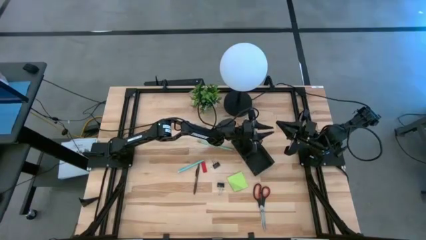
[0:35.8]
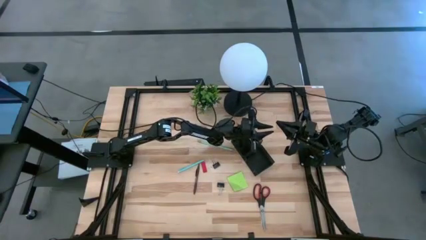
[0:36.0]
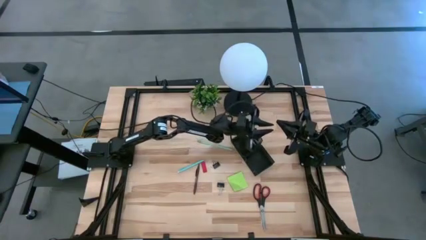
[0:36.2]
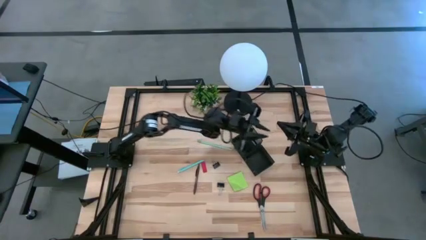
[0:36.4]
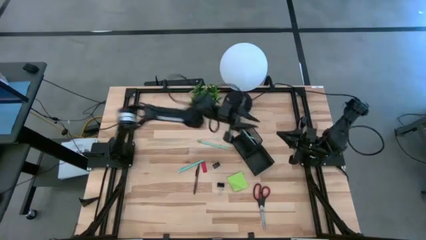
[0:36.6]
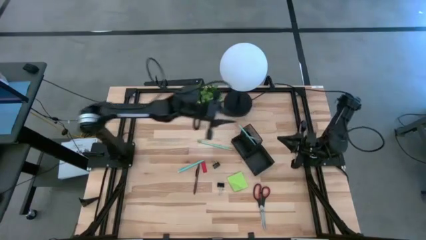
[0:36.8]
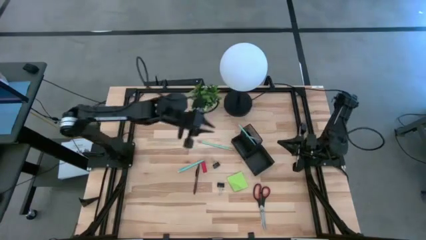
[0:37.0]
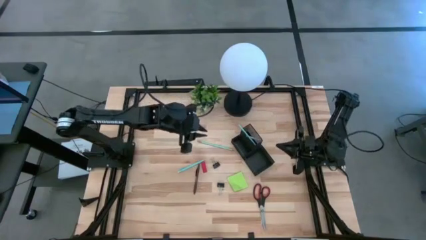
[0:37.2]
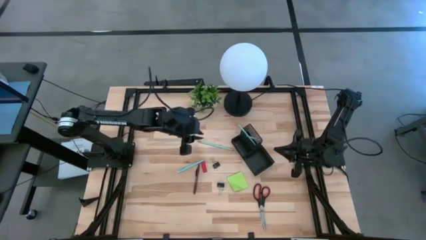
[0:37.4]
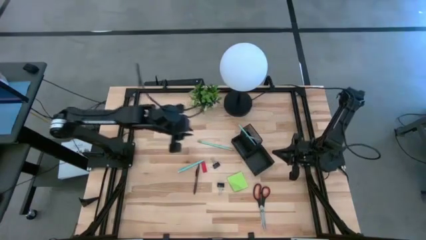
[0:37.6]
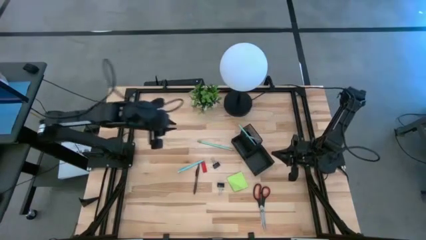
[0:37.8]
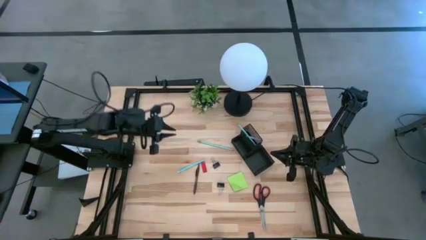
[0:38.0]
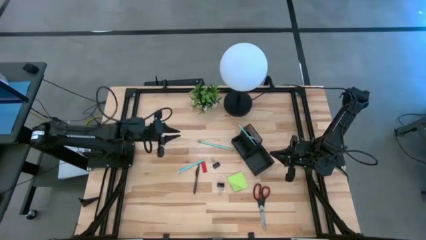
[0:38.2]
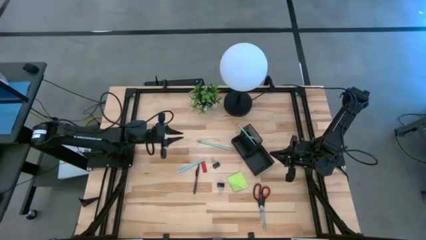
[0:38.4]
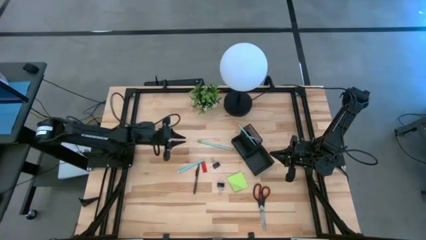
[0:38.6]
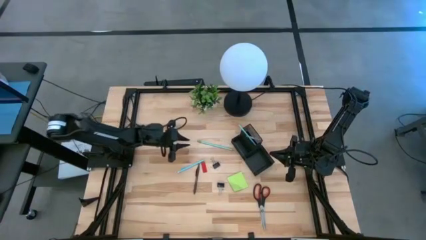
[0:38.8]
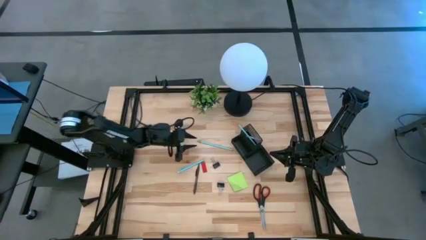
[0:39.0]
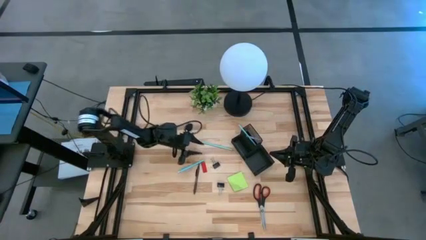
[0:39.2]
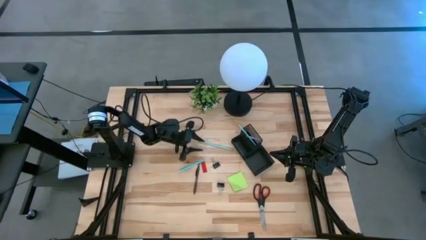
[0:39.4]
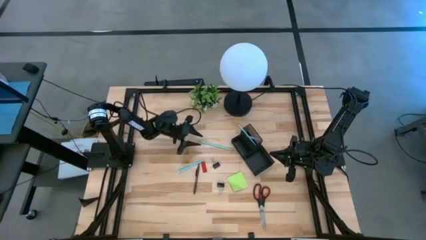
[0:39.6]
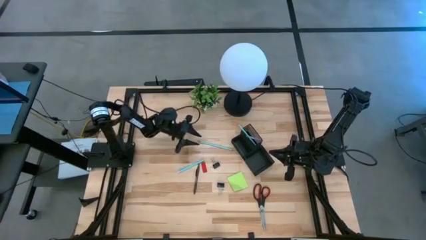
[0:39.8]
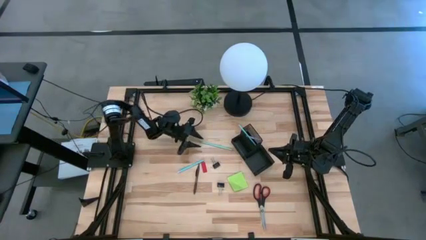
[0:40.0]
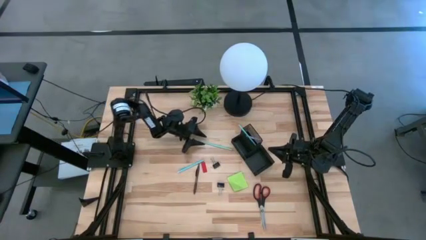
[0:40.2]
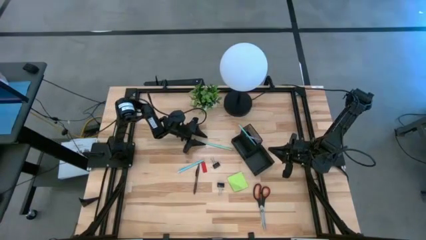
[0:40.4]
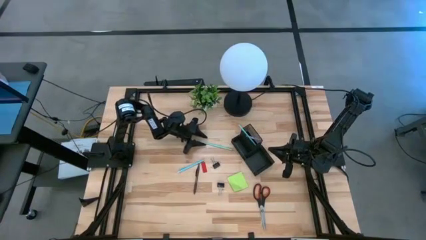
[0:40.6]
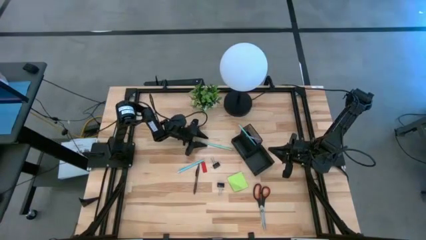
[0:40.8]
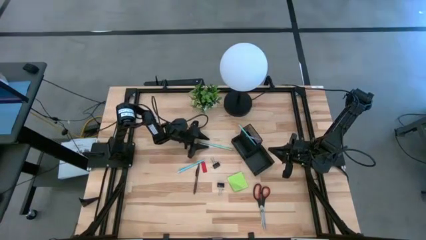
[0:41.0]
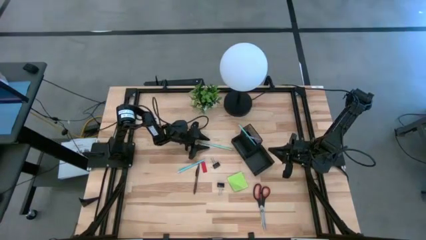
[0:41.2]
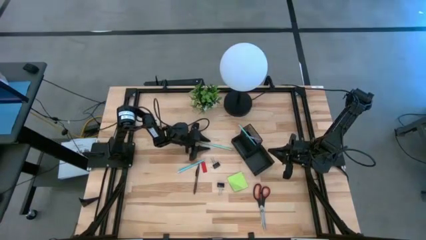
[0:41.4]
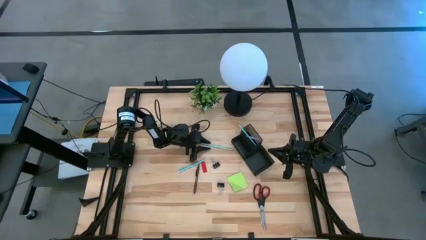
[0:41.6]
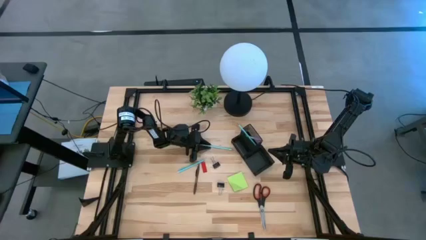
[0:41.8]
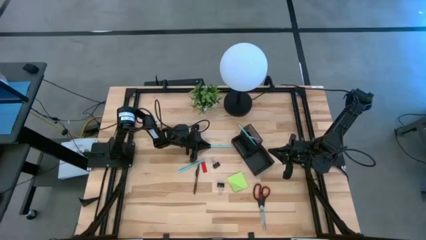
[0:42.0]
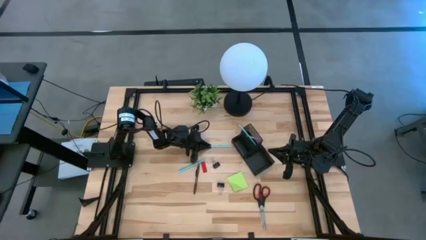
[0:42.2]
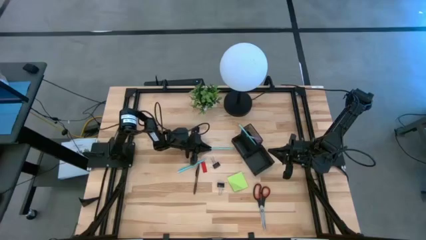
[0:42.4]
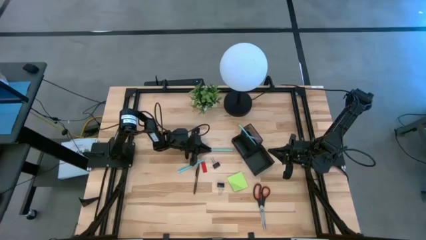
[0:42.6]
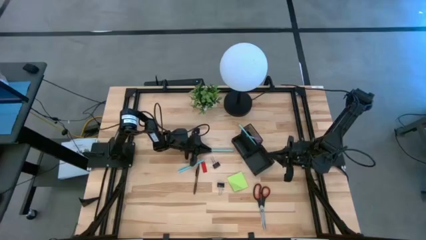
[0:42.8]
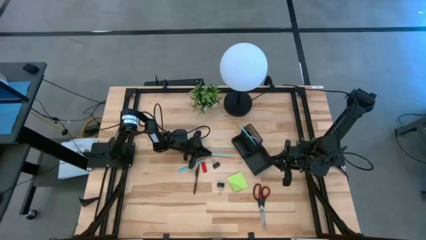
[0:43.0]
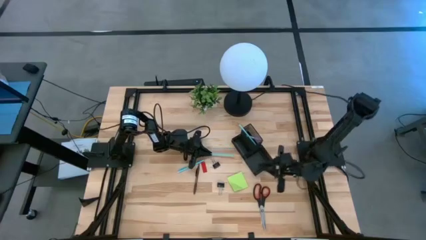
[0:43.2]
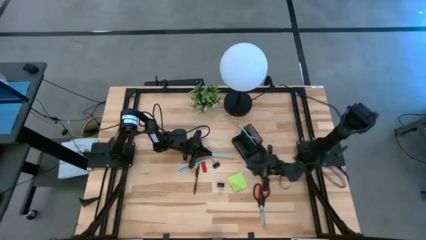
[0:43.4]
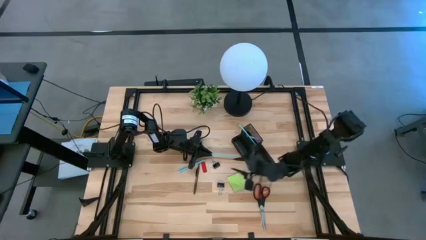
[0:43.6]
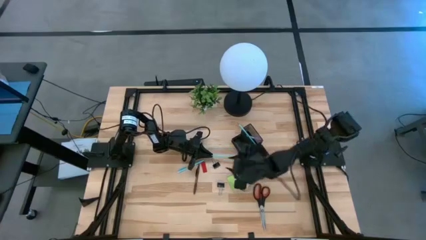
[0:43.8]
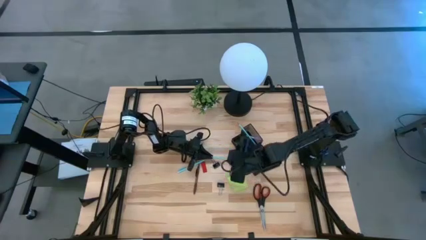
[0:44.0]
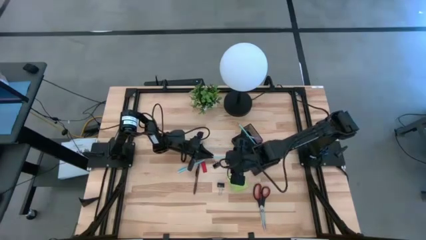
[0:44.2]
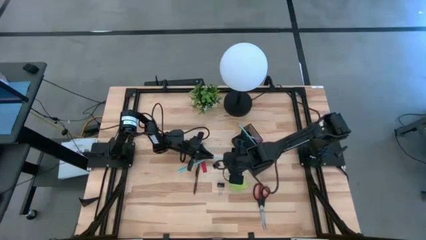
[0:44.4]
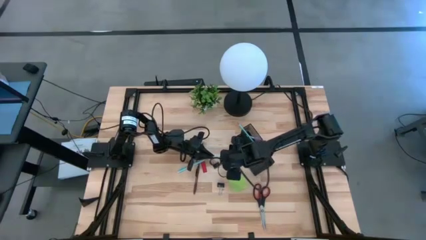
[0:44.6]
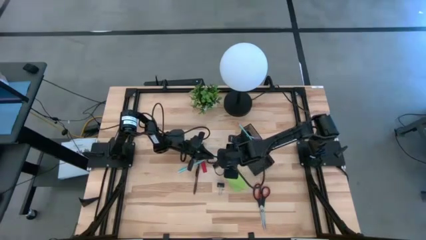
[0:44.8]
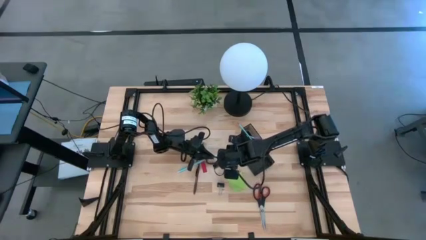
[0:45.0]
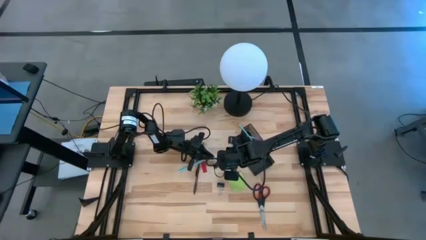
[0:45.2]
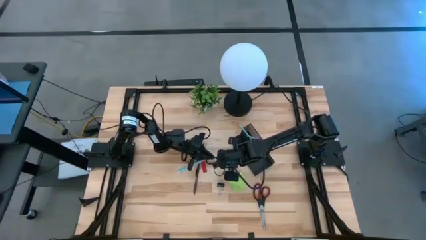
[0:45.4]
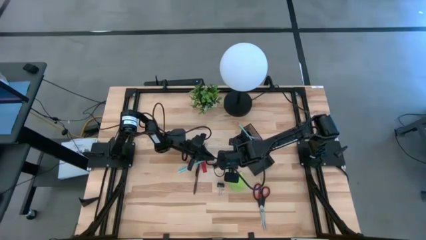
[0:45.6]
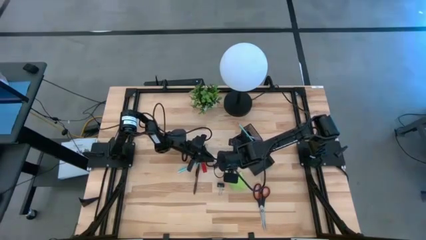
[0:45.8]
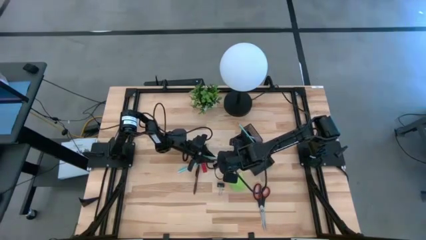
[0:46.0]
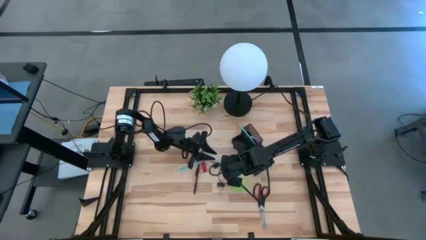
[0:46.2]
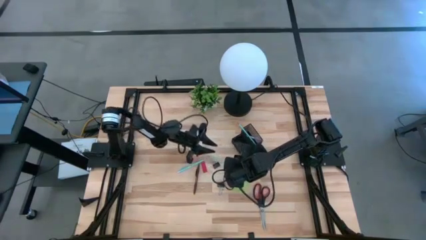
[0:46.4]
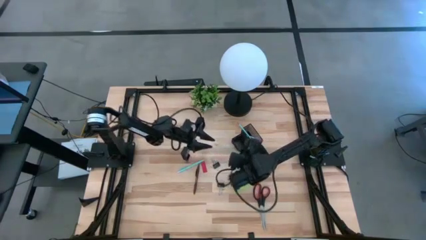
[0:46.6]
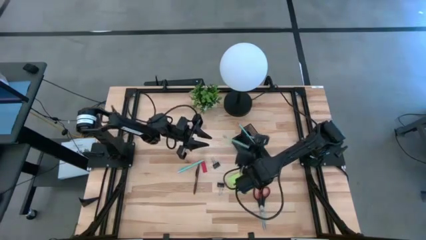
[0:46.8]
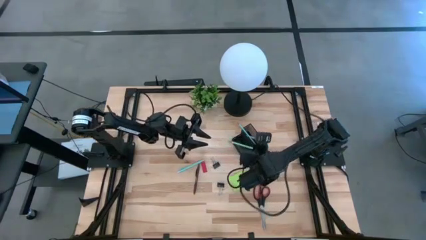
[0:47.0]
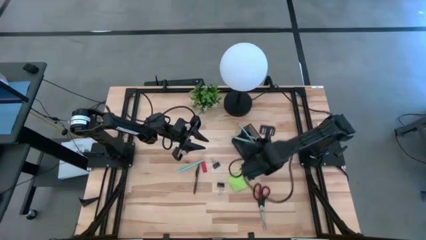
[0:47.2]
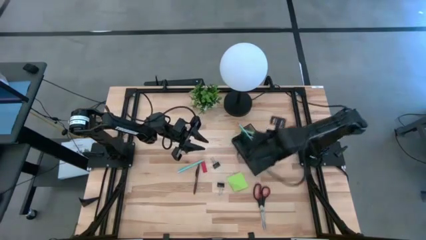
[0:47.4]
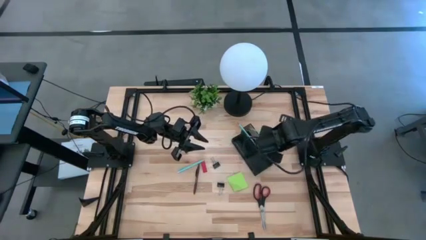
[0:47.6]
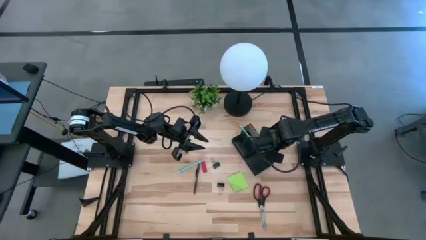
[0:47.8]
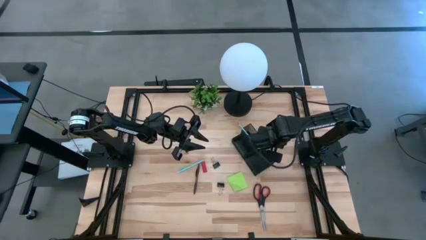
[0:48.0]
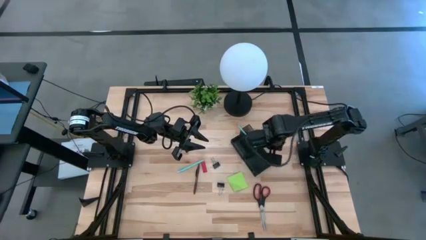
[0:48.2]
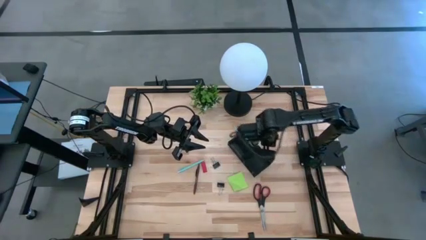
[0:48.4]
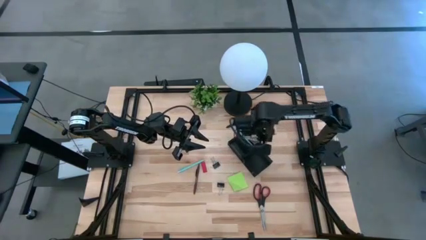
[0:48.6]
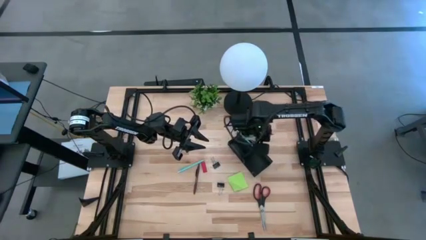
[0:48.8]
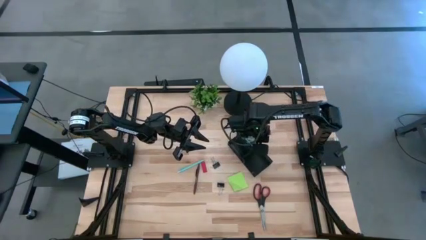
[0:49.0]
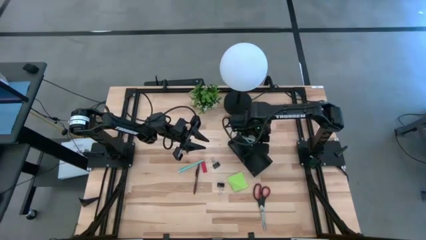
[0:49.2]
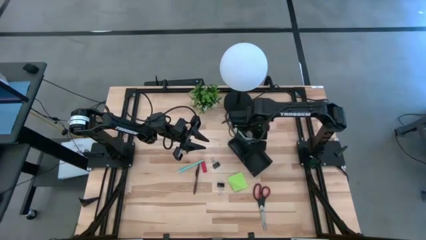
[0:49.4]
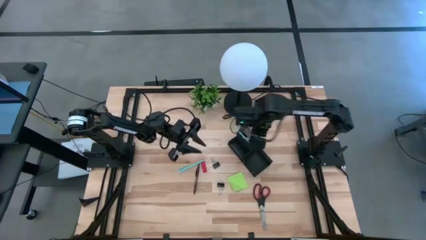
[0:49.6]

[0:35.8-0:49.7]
Task: Pick and place office supplies into organizer
Put the light blue pencil into the desk organizer
